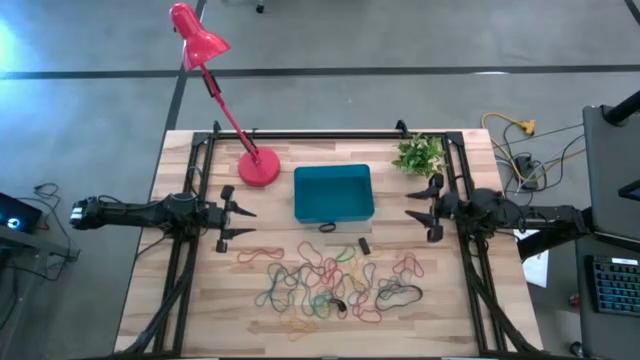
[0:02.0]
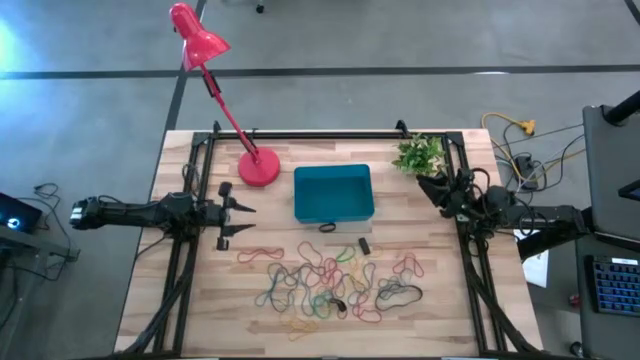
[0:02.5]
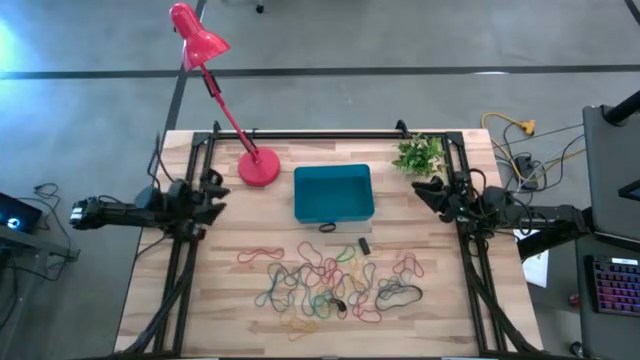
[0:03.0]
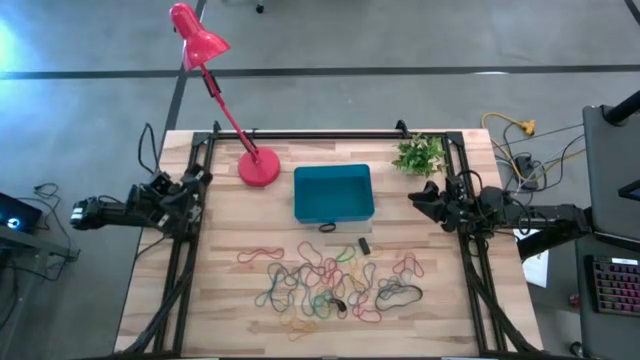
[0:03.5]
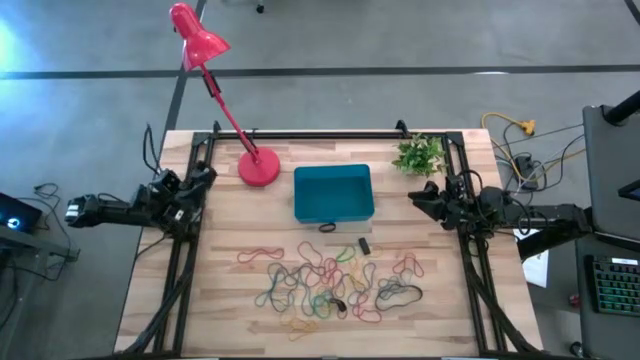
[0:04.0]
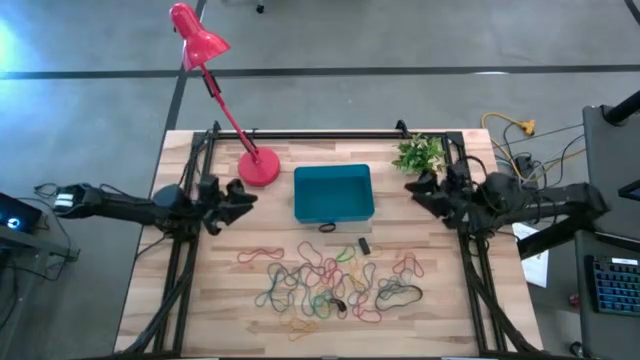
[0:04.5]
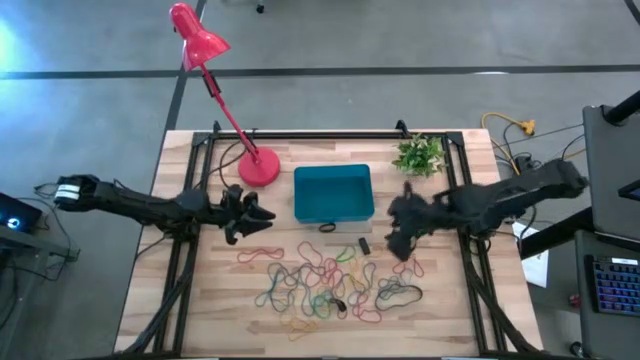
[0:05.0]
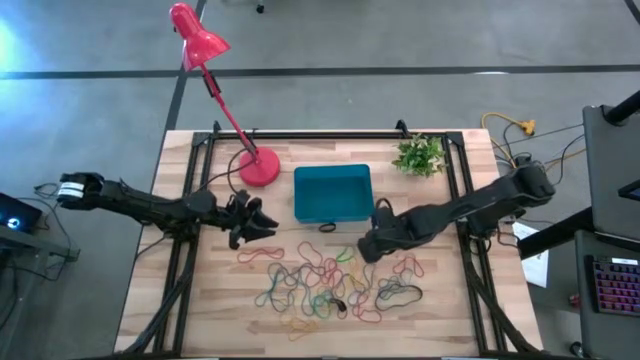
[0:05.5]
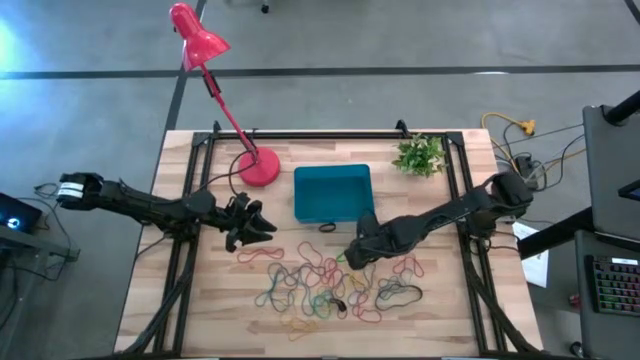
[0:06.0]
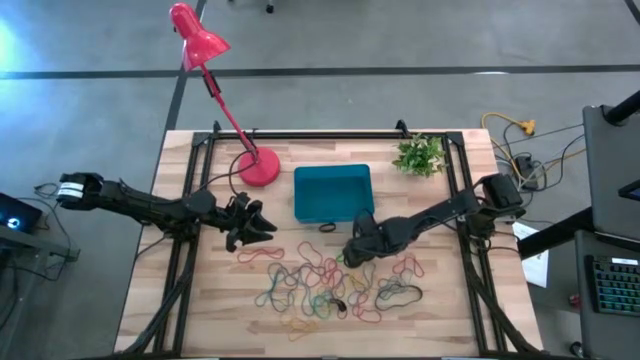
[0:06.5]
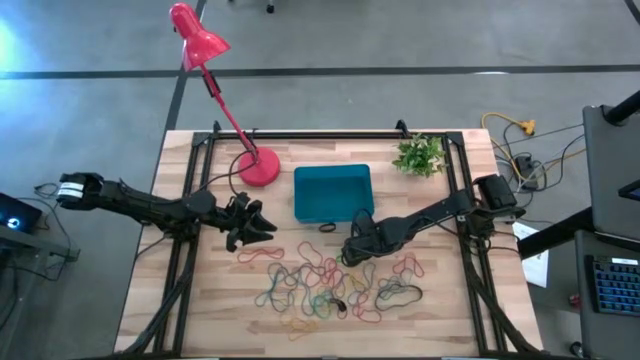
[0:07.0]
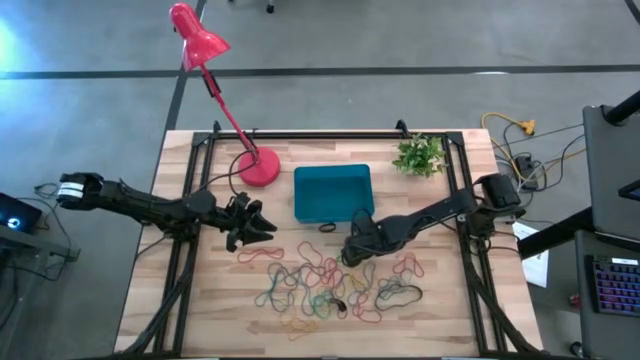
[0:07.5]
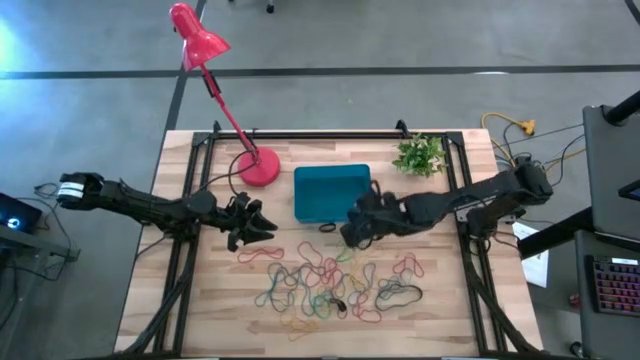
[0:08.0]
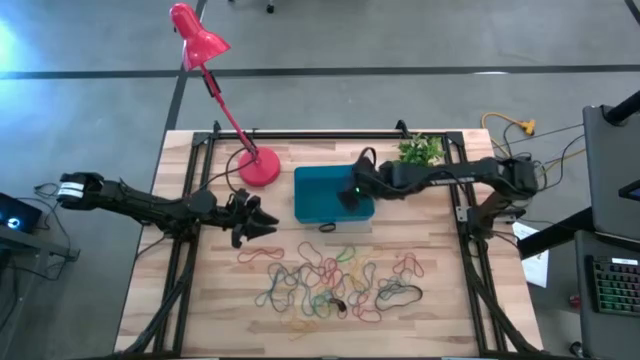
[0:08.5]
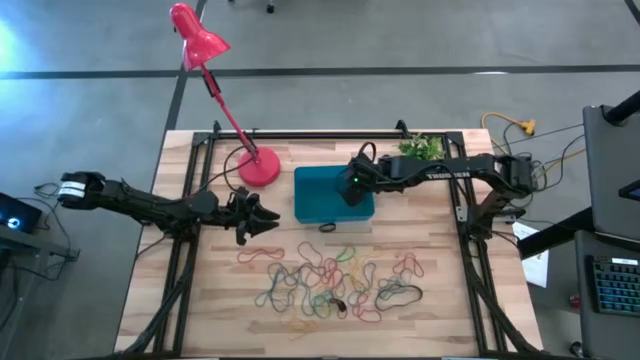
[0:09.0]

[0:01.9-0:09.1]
Task: Pick and place rubber bands into bin
Put the black rubber band into the blue bin

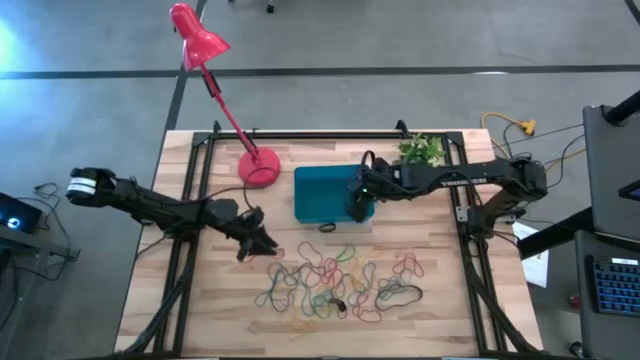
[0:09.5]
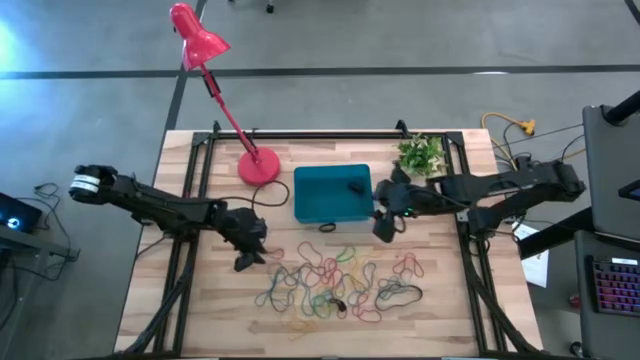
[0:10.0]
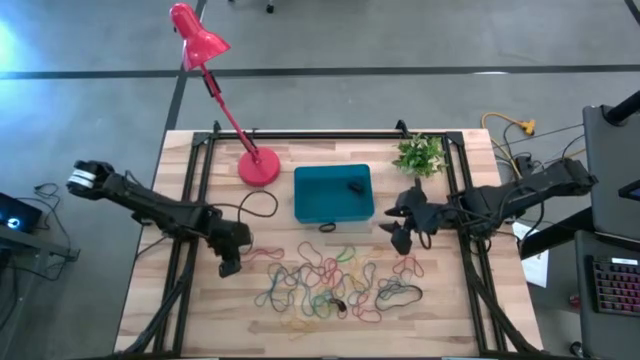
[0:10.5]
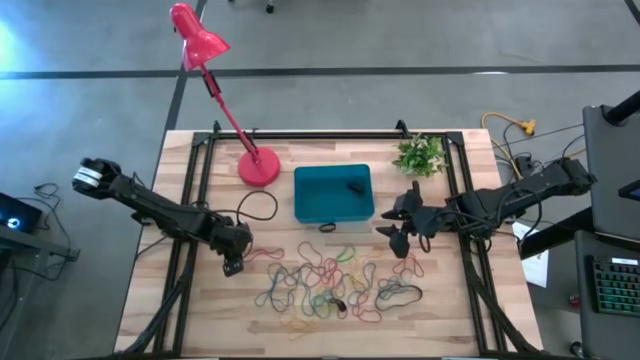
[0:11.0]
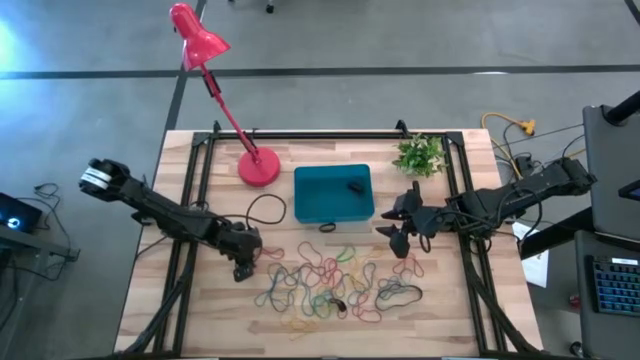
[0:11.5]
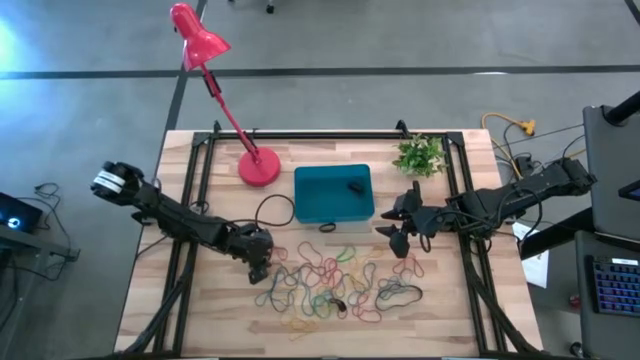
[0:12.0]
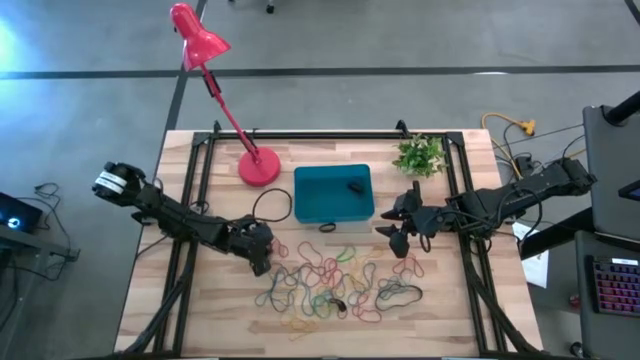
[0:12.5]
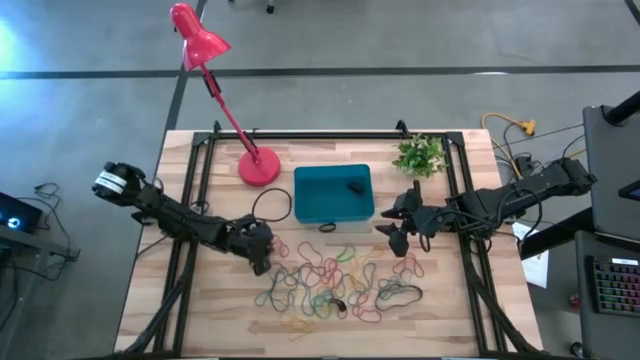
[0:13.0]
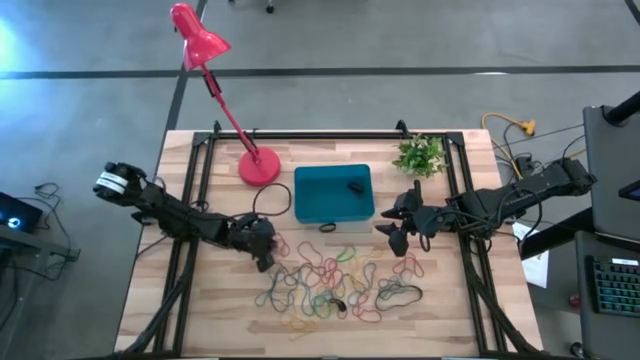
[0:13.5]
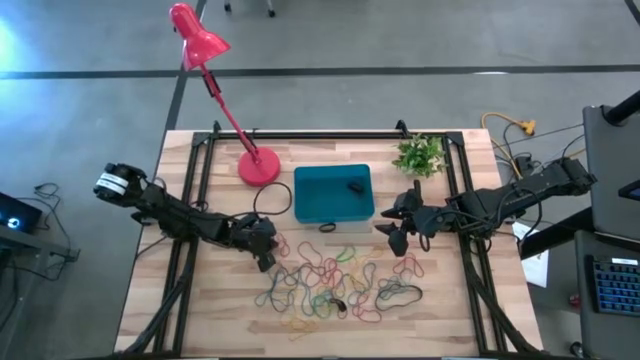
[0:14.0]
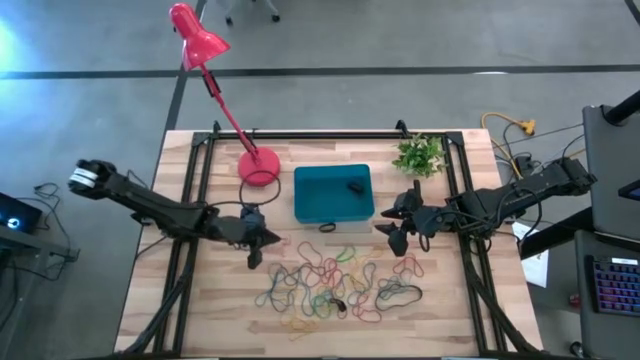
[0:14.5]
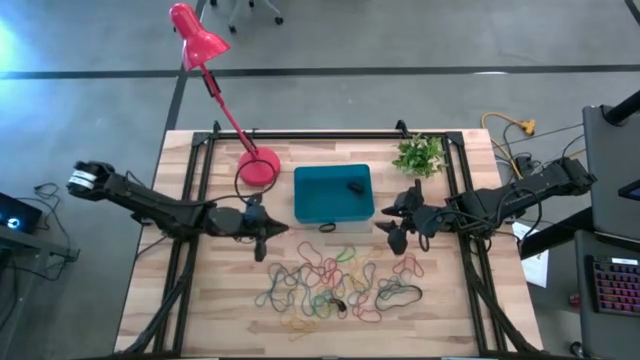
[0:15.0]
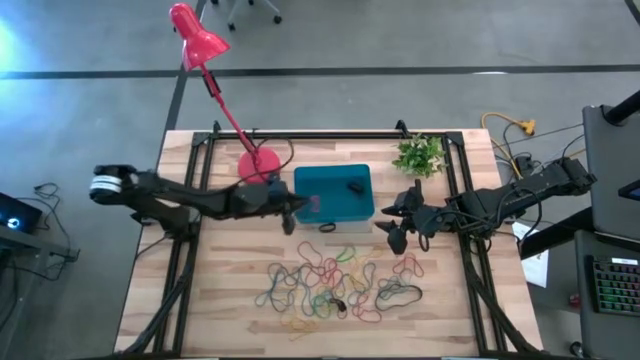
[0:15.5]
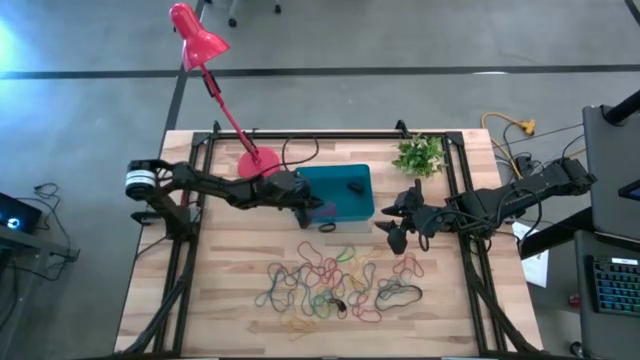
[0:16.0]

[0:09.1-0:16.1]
Put the red rubber band into the blue bin

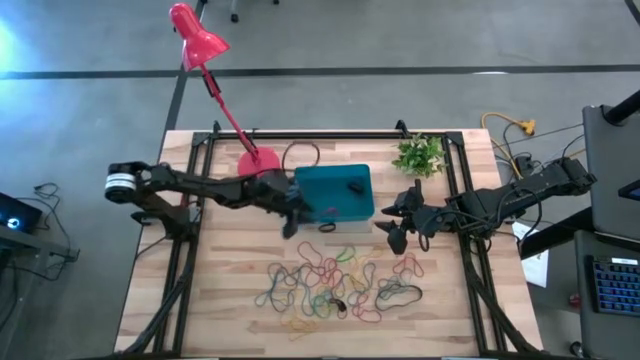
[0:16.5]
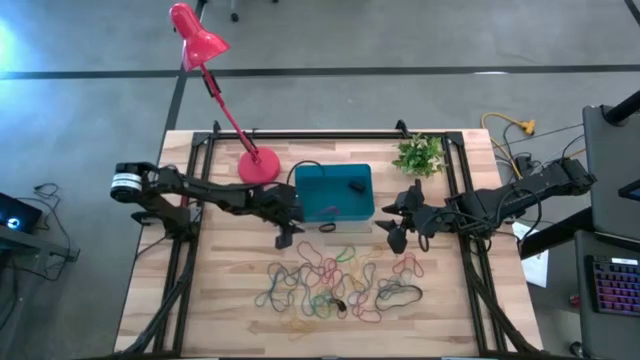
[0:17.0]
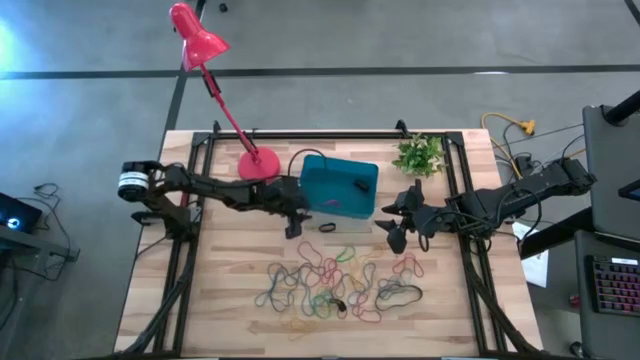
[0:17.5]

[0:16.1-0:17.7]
Adjust the blue bin

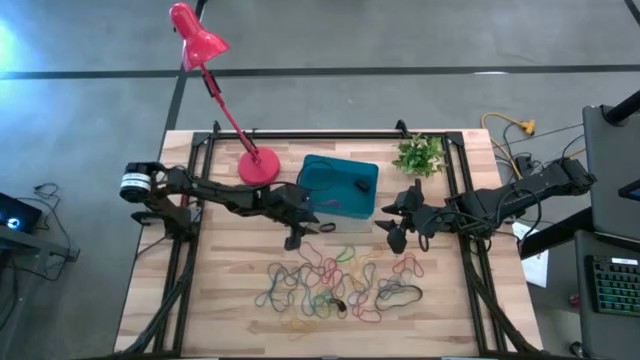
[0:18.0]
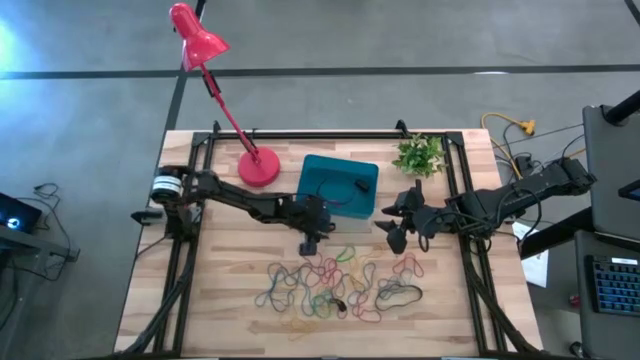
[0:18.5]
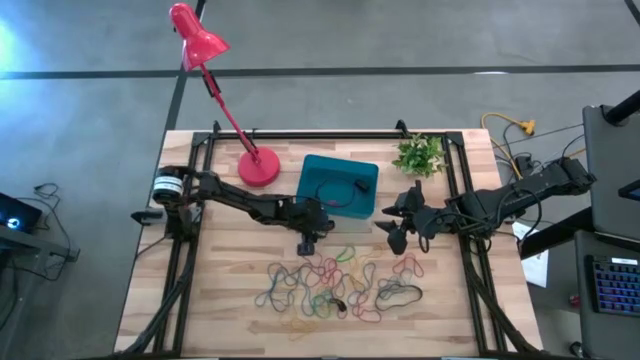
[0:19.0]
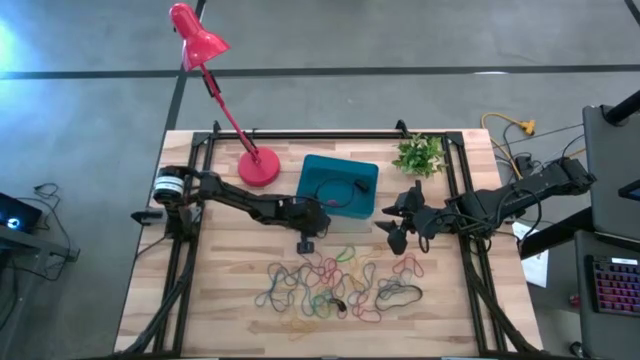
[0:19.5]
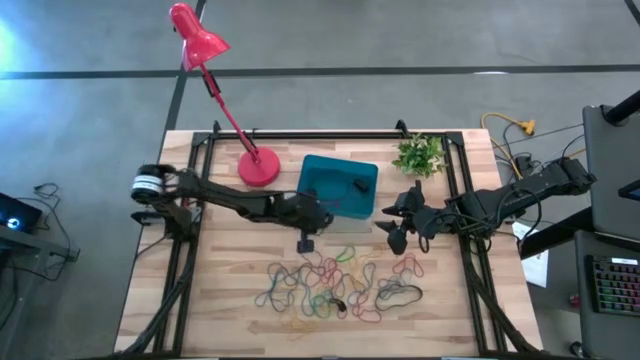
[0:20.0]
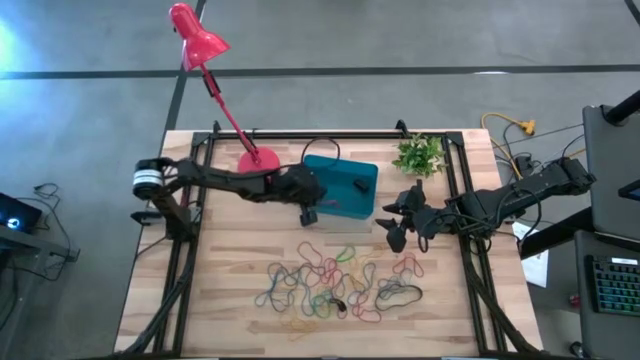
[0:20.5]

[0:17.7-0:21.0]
Put the black rubber band into the blue bin

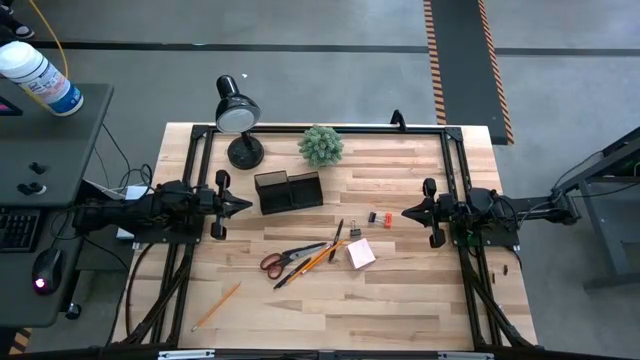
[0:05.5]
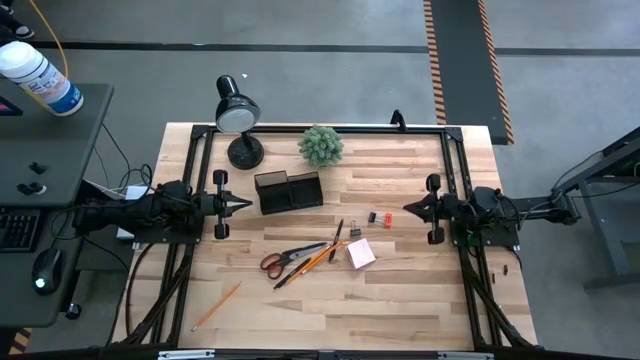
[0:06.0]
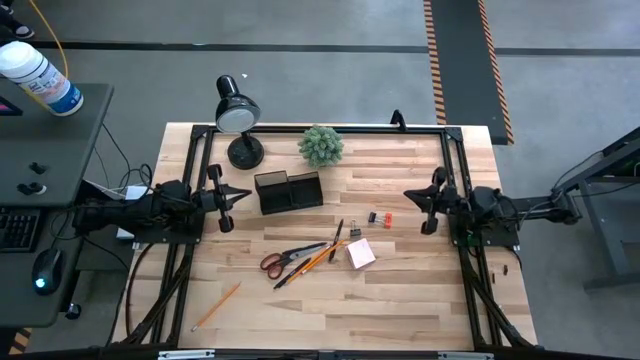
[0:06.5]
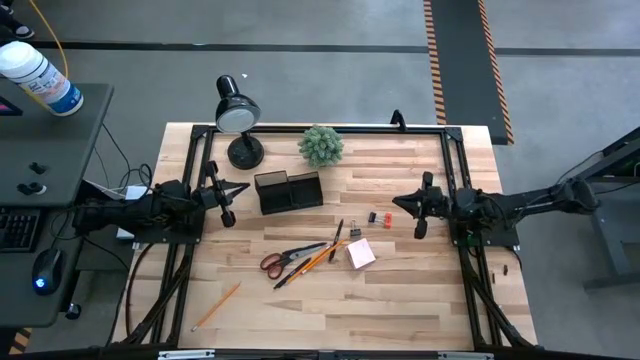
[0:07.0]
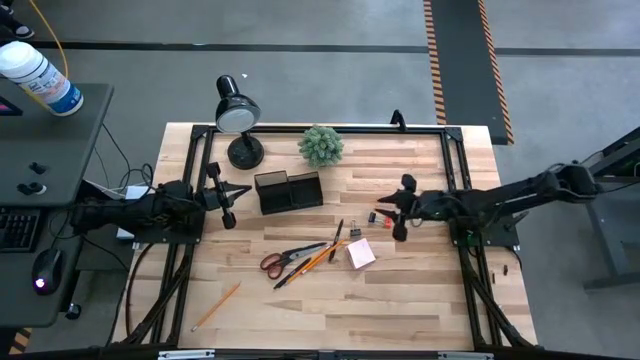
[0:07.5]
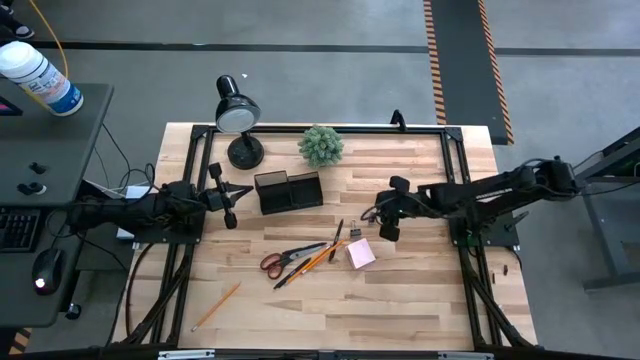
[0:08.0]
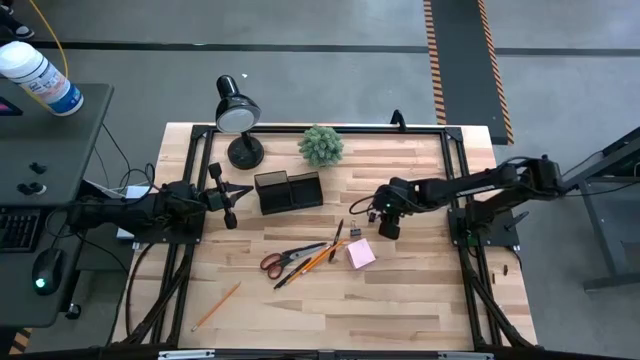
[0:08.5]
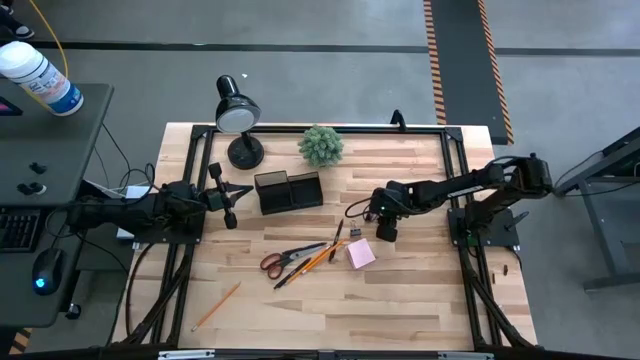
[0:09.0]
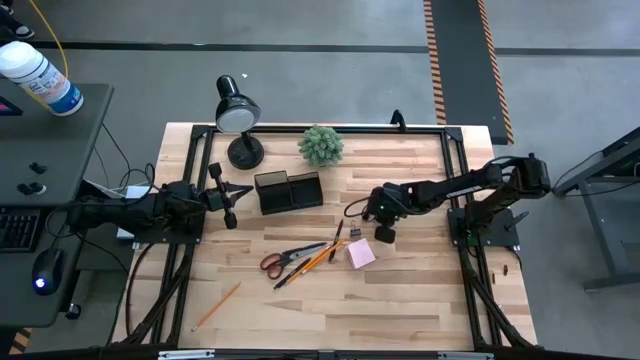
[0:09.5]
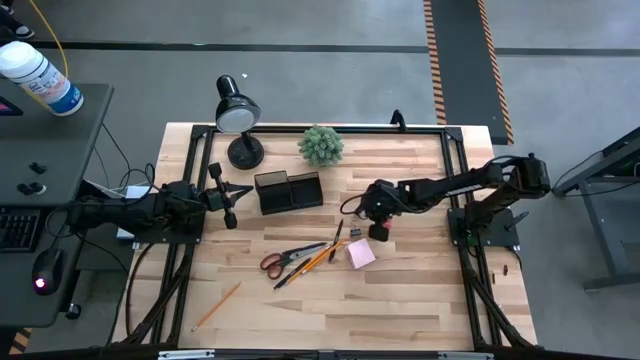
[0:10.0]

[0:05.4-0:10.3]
Task: Pick and place office supplies into organizer
Put the right clip binder into the desktop organizer
